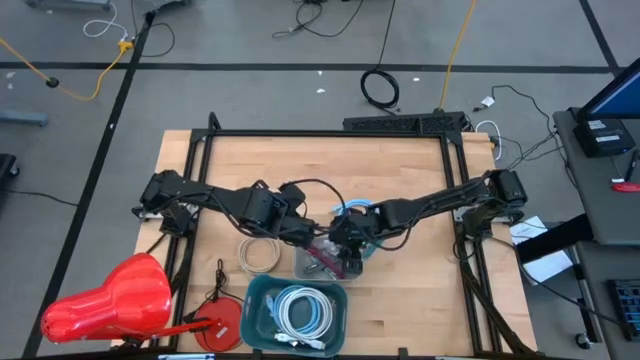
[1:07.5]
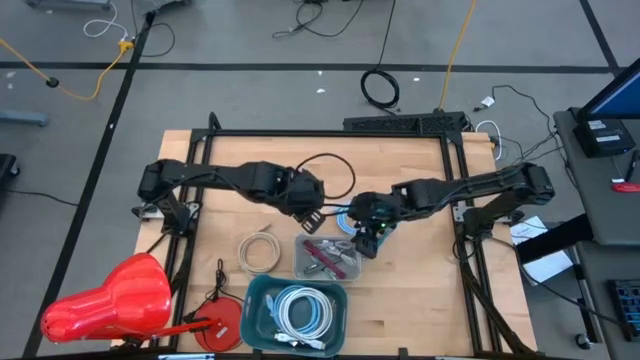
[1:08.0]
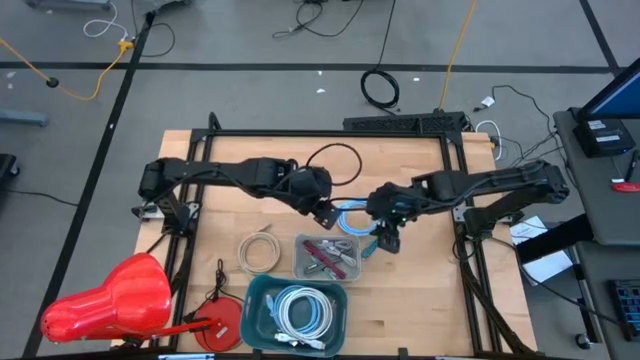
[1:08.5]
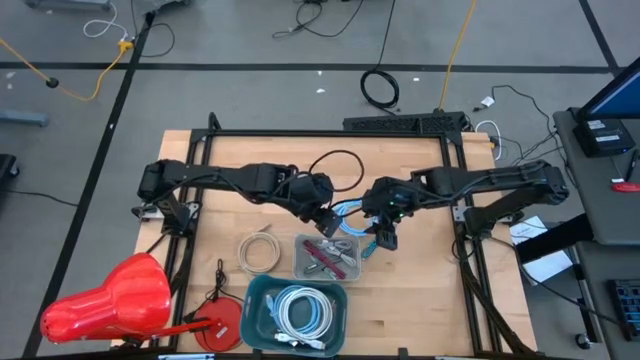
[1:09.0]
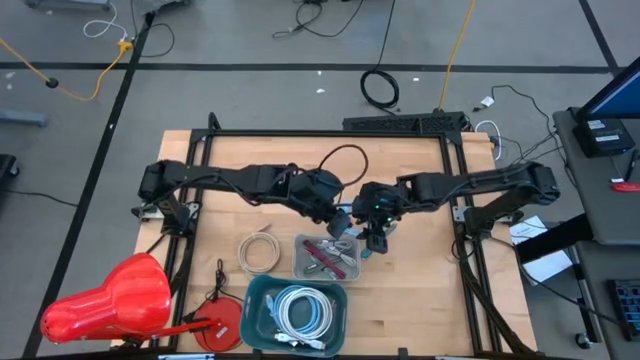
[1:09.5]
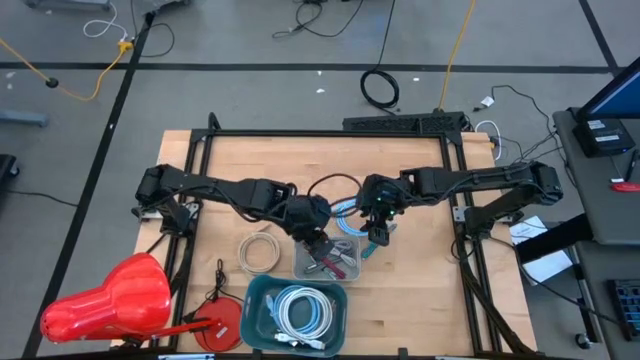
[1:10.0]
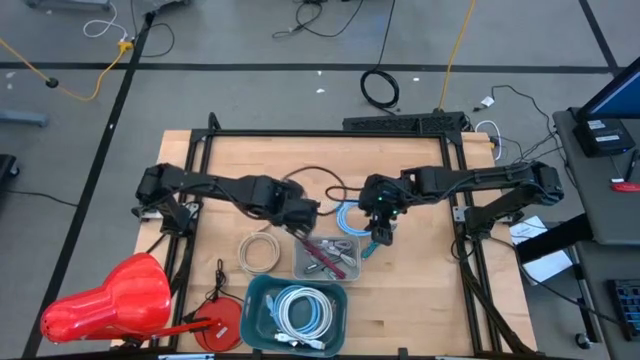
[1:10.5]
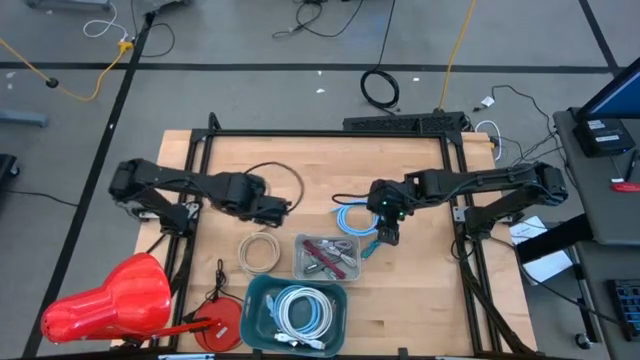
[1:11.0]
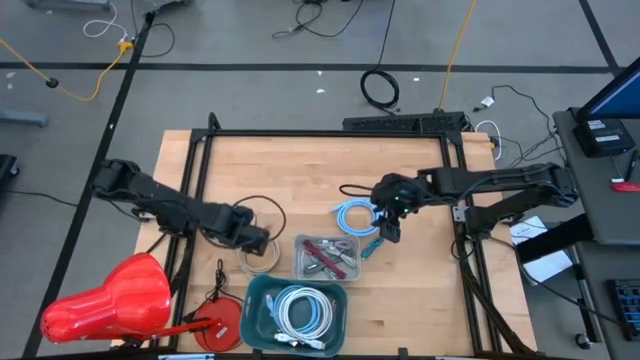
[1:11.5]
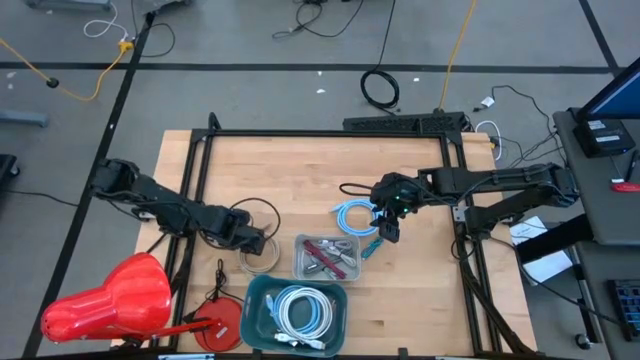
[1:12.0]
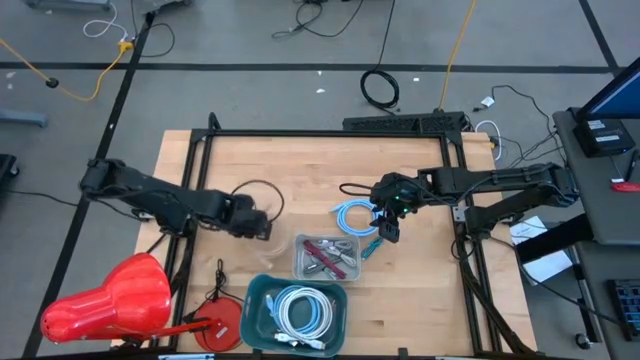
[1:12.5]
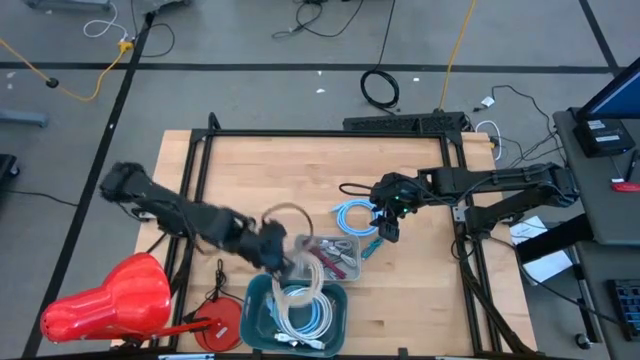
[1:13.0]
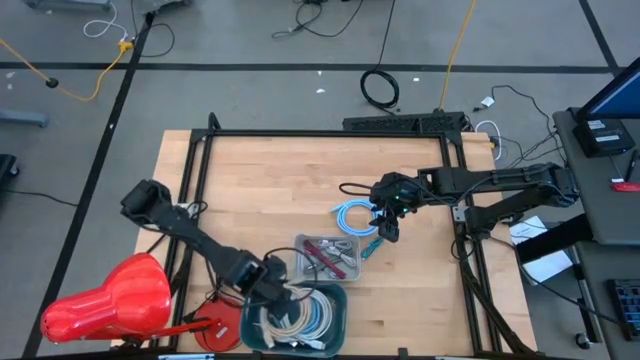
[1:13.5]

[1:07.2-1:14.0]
Task: Pick & Place USB Port
Put the brown HDMI cable into the blue bin

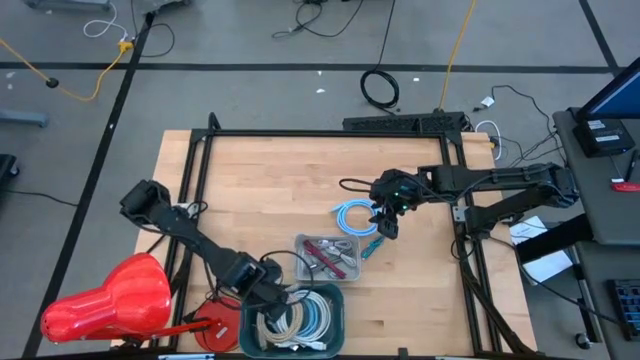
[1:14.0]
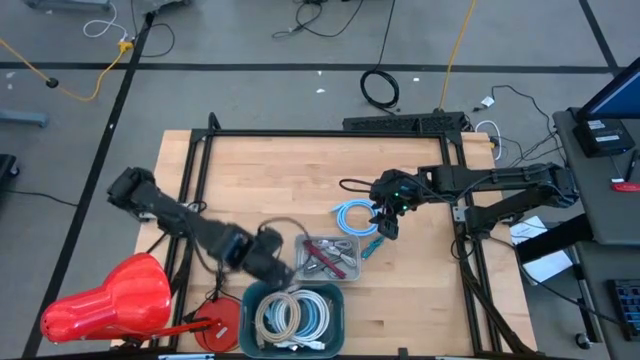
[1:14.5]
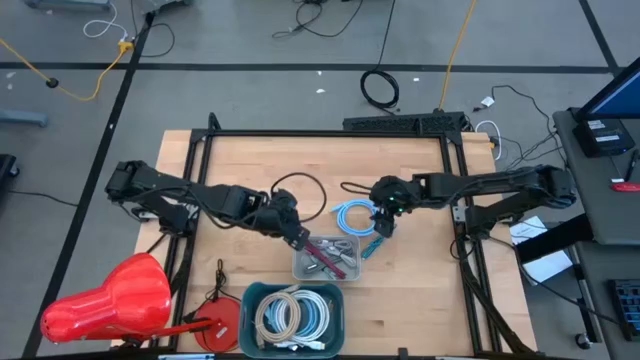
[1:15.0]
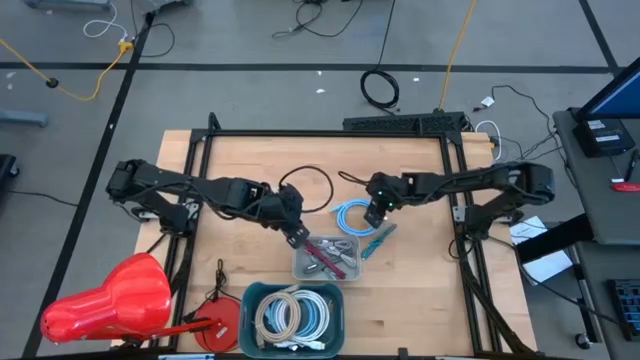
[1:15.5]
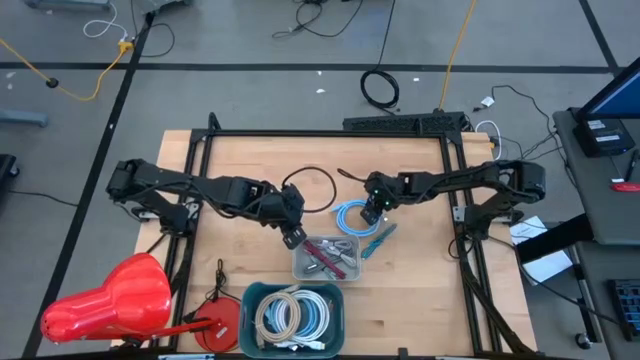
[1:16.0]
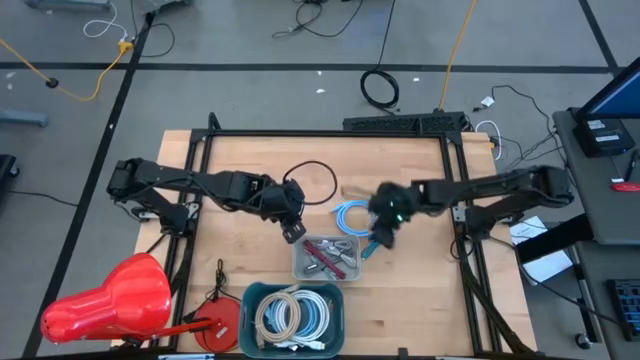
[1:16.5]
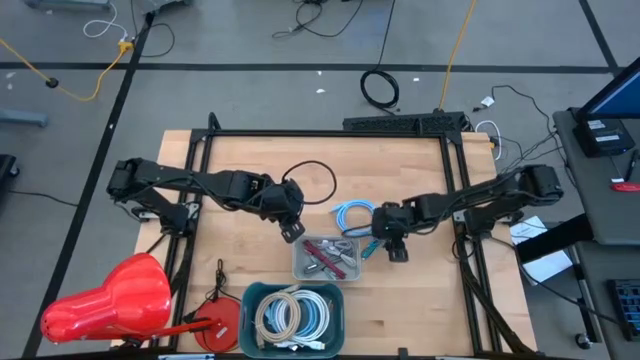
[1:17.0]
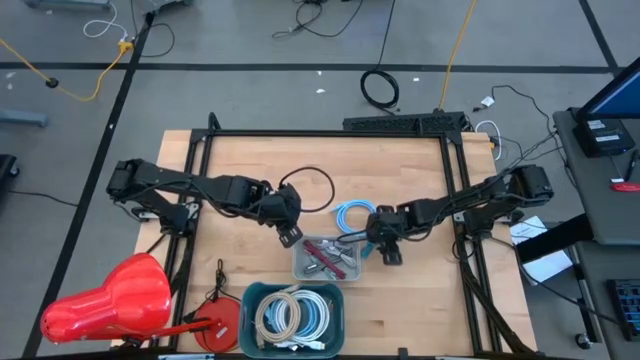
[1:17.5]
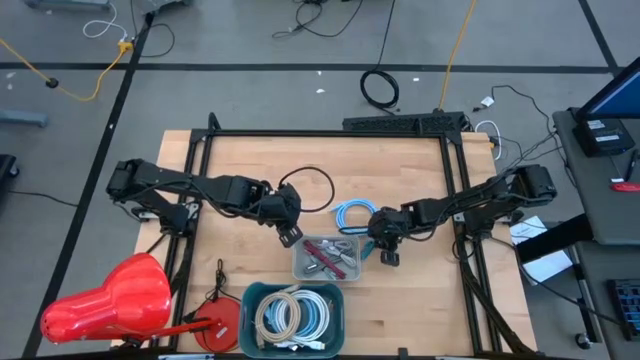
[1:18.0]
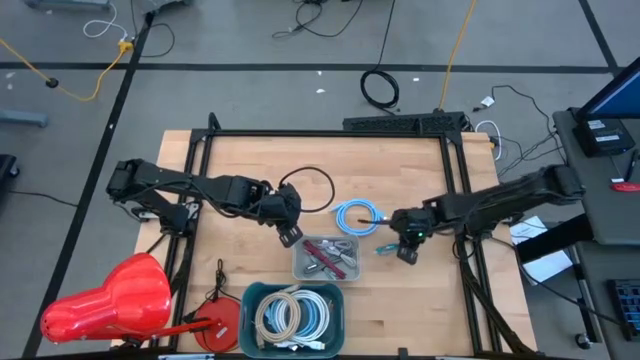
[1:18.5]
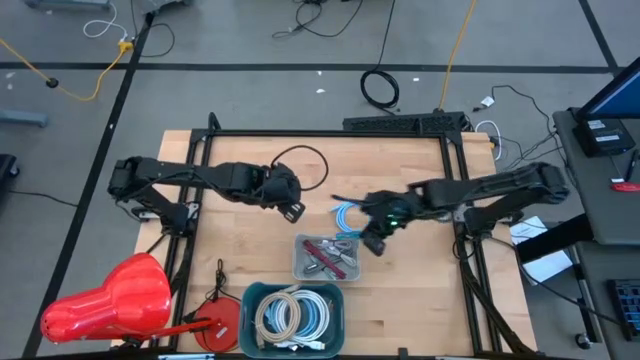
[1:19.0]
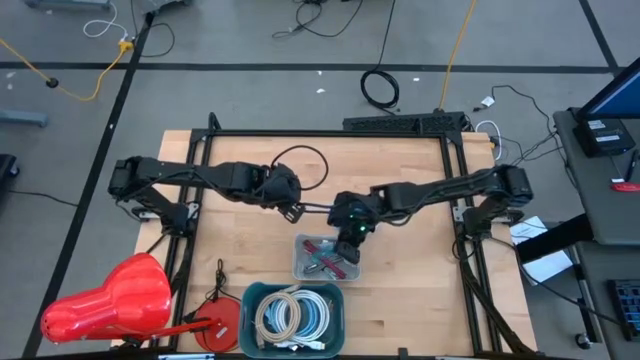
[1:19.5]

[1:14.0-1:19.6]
Put the blue charger cable into the gray bin

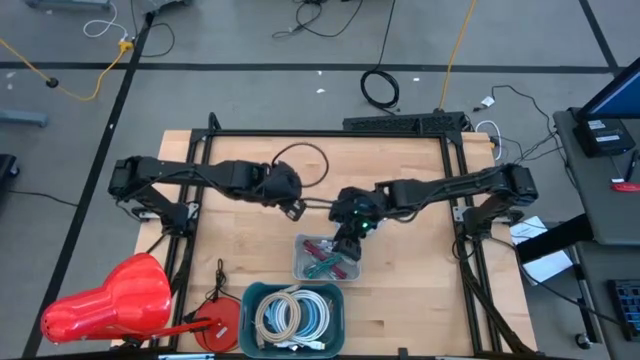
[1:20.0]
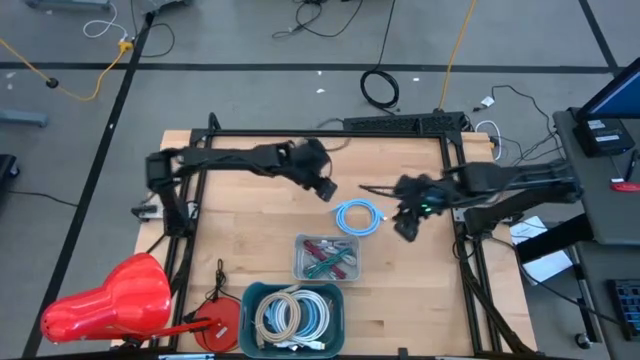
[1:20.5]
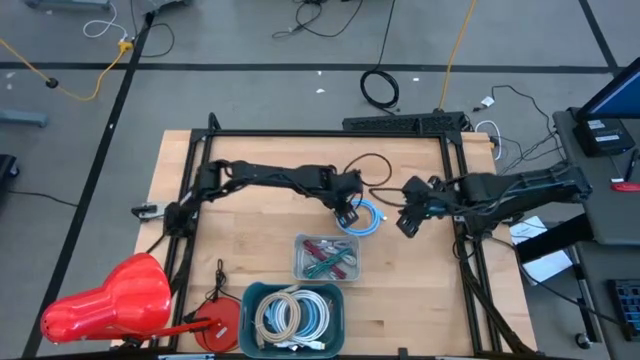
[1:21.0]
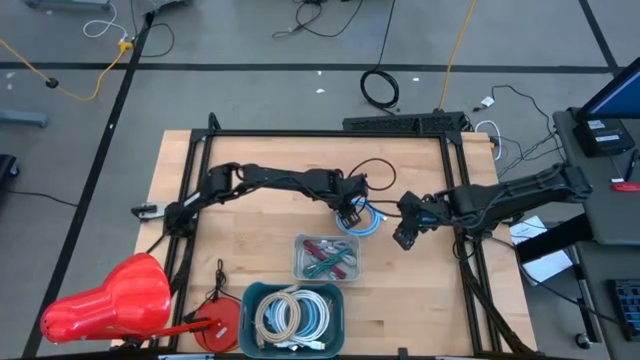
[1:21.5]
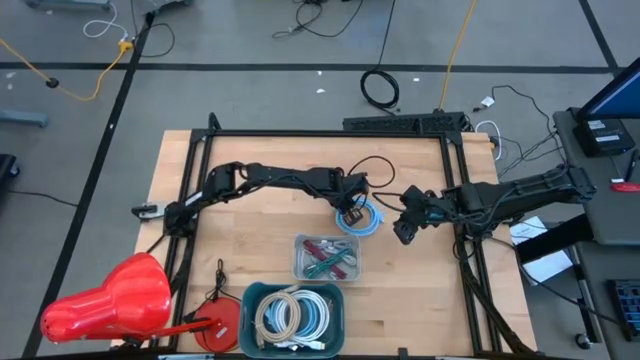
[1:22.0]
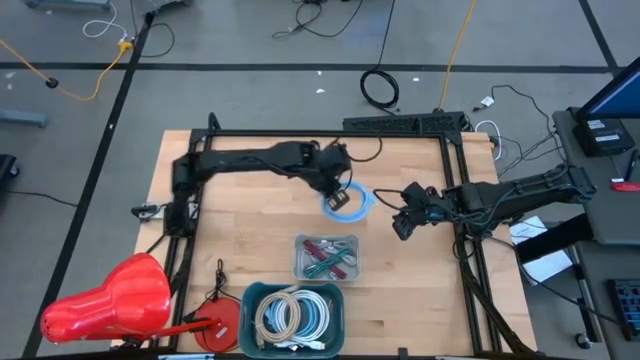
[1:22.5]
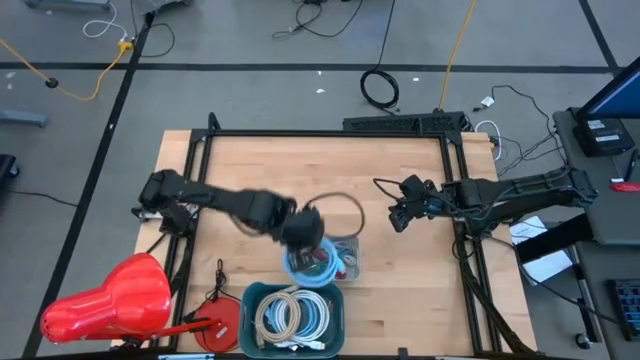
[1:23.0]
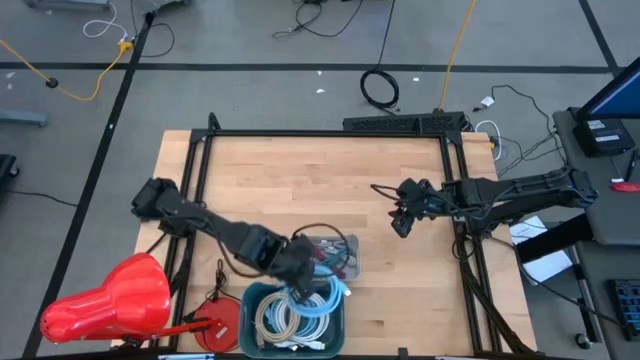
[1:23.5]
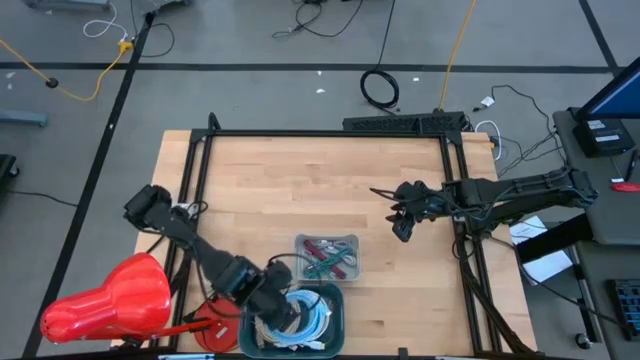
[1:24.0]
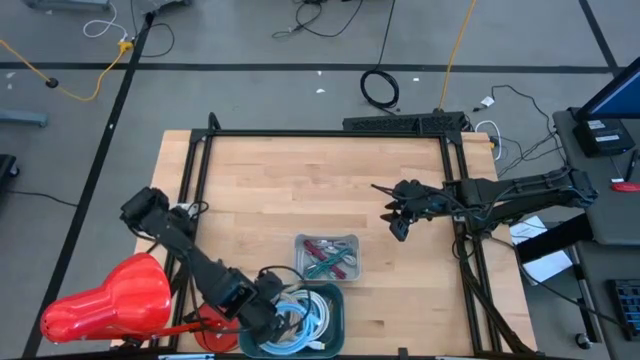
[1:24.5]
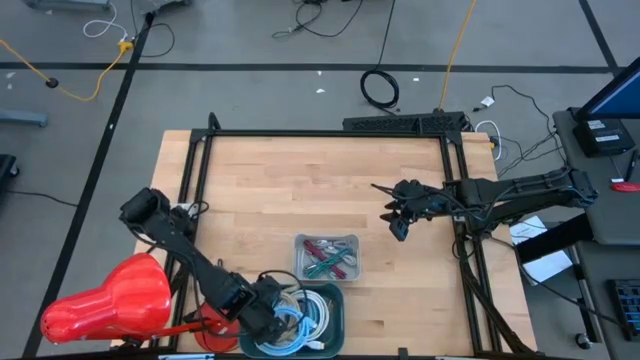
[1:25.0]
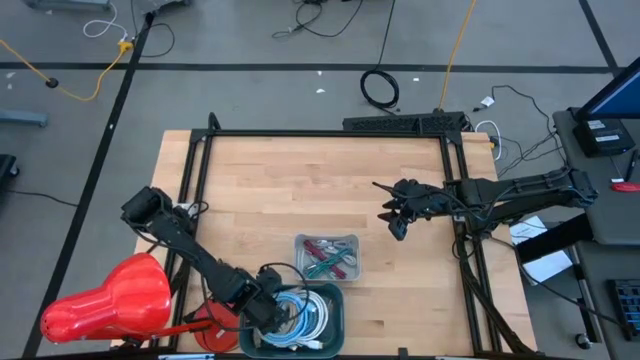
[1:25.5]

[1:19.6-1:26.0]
Put the blue HDMI cable into the blue bin

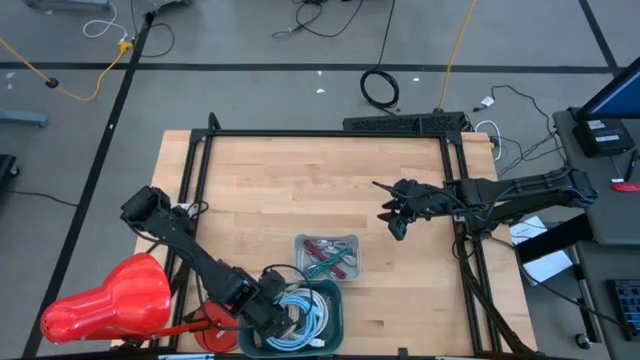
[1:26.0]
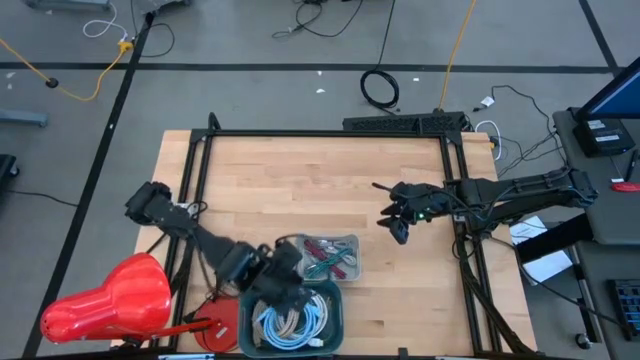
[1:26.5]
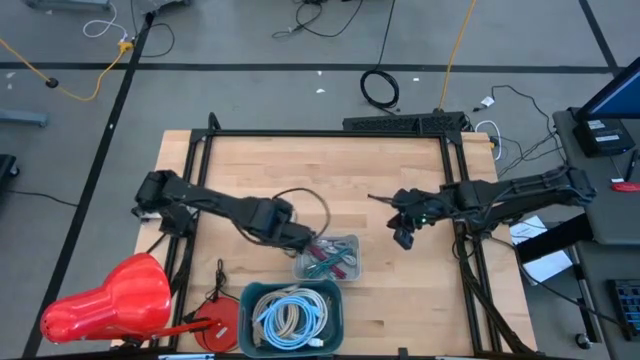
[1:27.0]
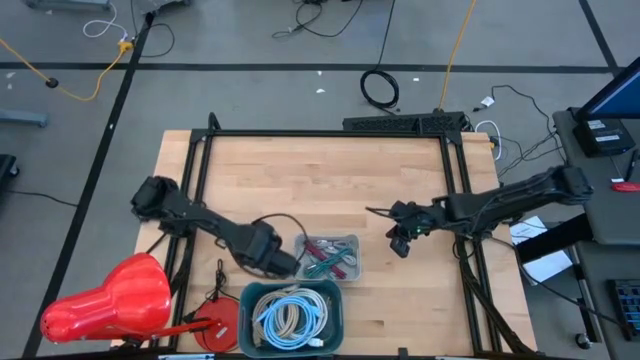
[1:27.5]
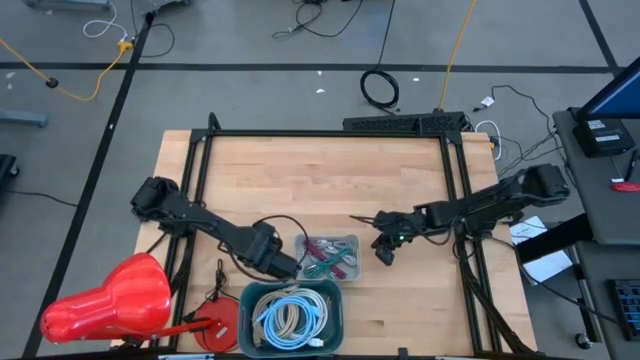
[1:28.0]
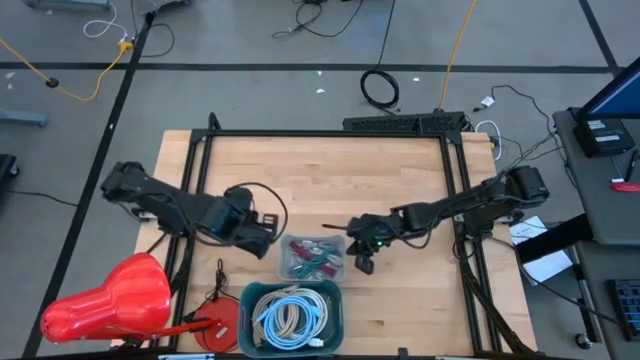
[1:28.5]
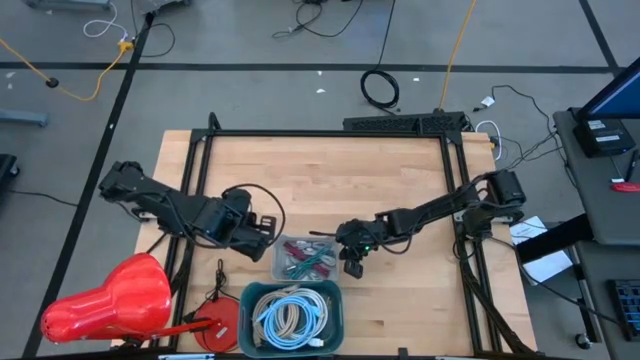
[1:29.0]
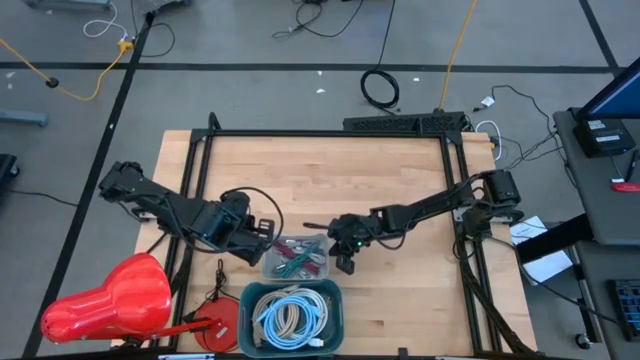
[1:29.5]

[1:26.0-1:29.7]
Adjust the gray bin
